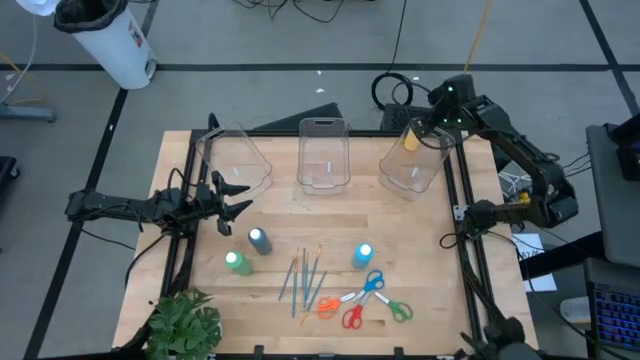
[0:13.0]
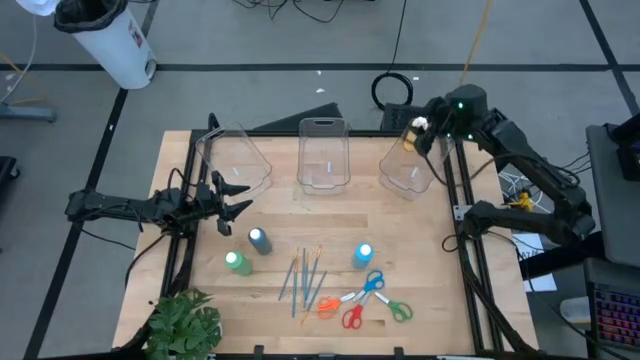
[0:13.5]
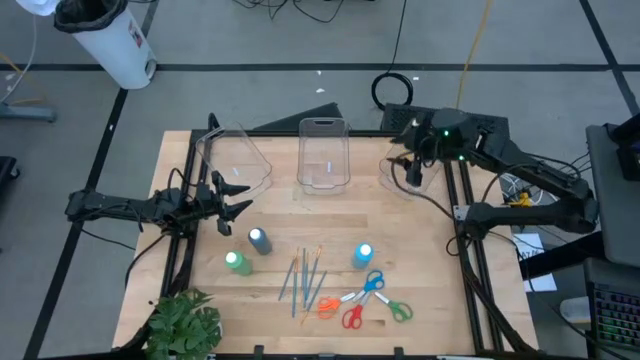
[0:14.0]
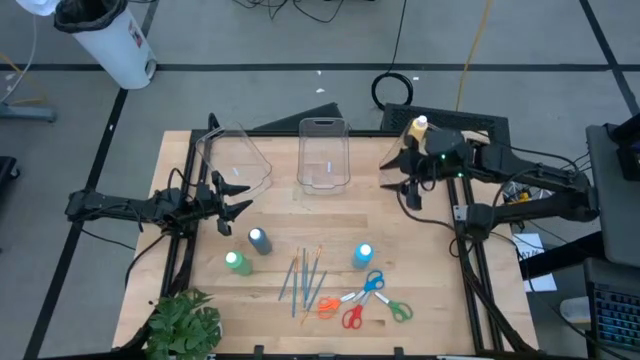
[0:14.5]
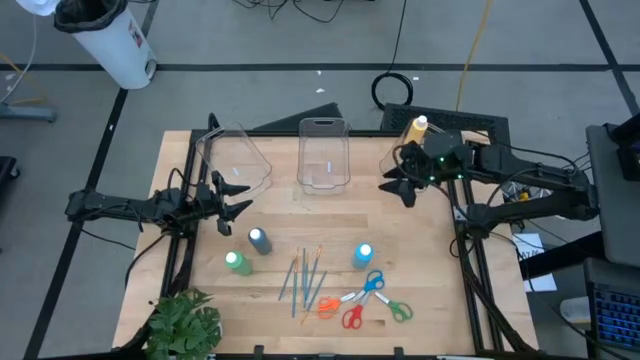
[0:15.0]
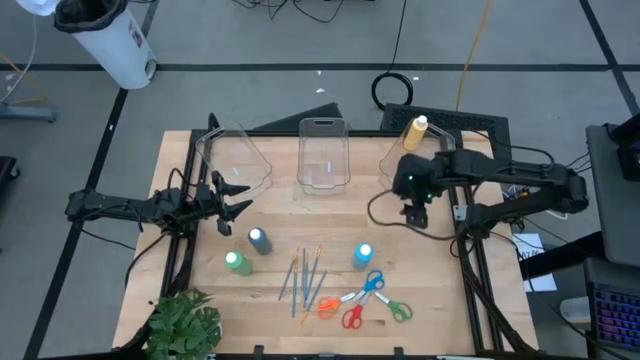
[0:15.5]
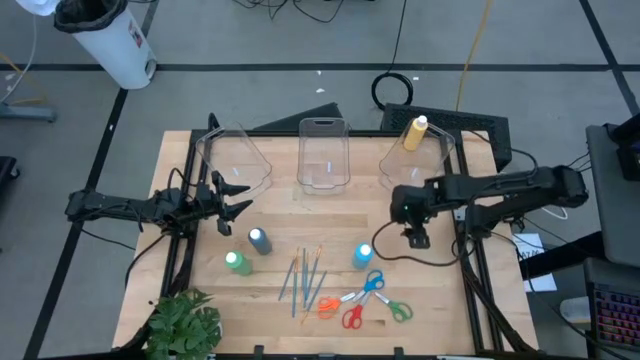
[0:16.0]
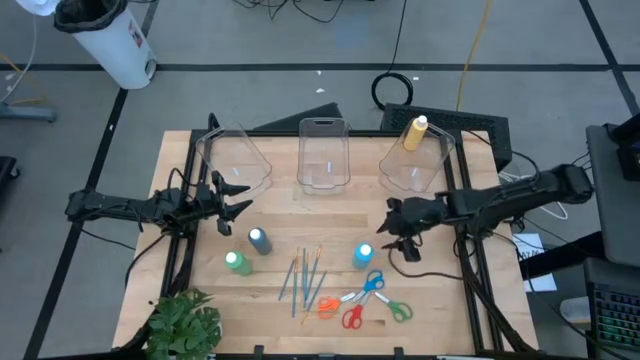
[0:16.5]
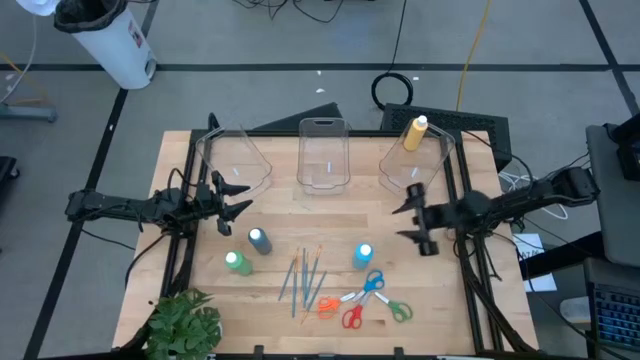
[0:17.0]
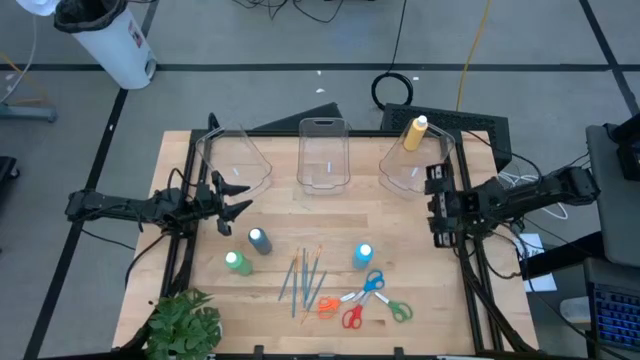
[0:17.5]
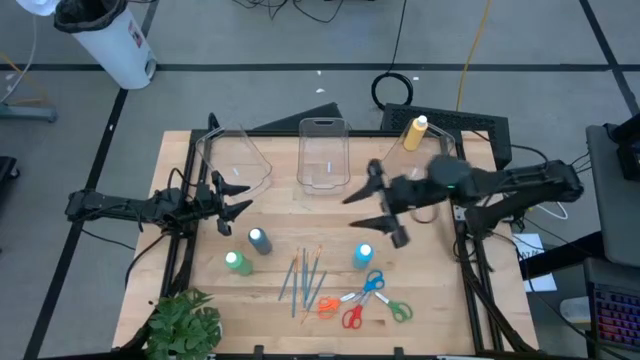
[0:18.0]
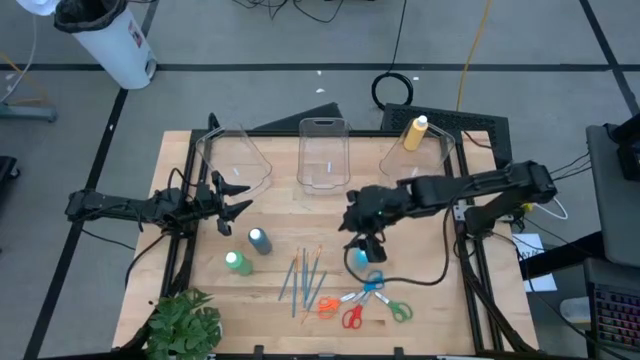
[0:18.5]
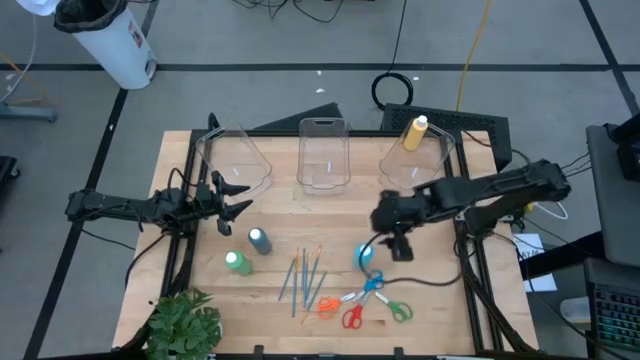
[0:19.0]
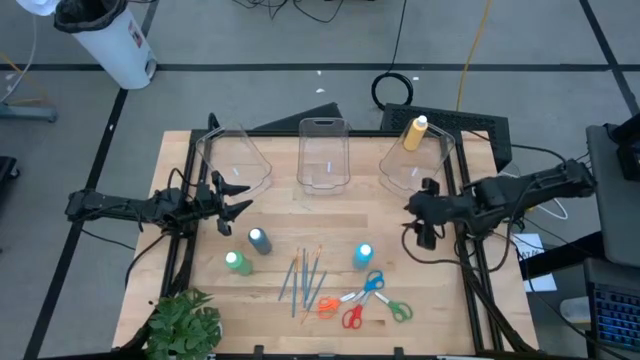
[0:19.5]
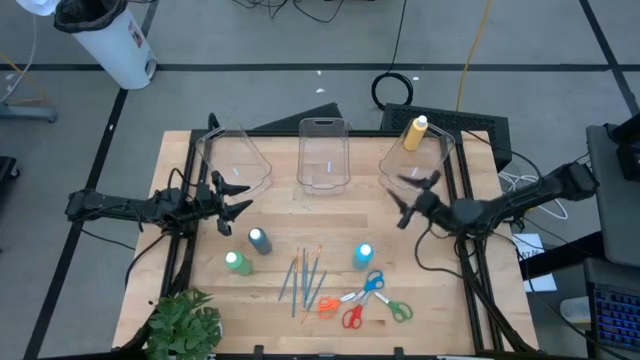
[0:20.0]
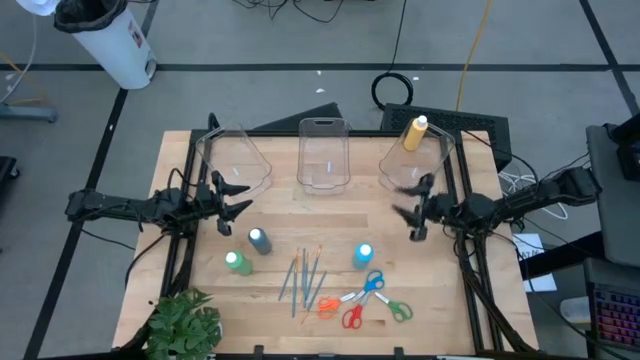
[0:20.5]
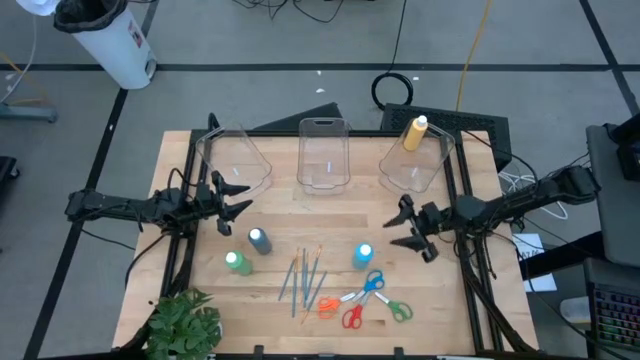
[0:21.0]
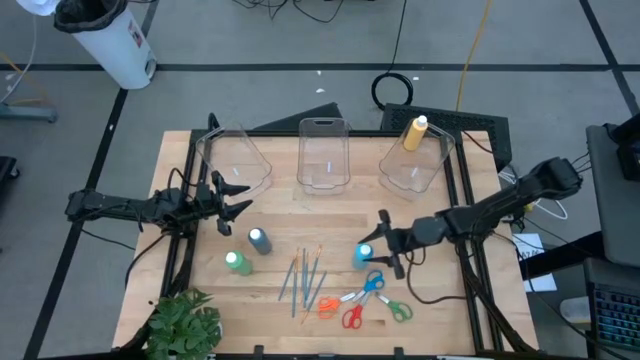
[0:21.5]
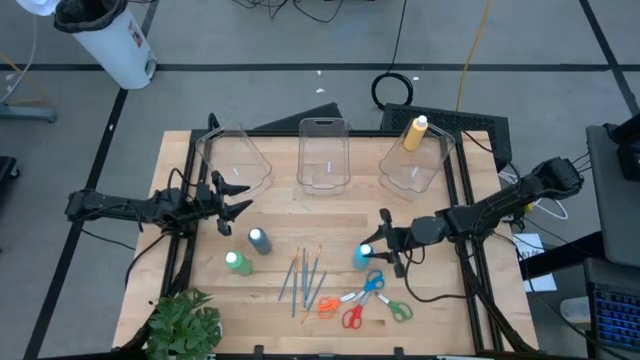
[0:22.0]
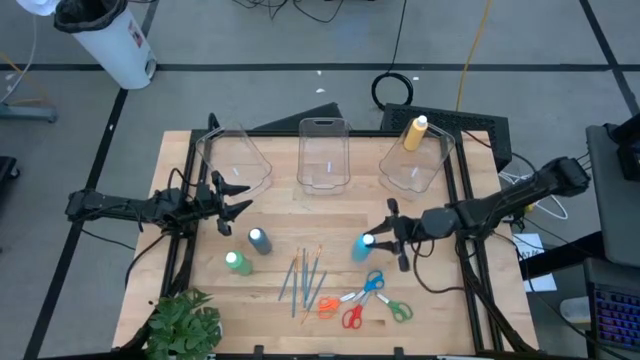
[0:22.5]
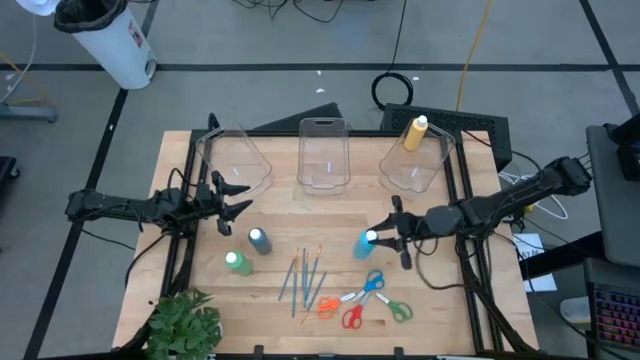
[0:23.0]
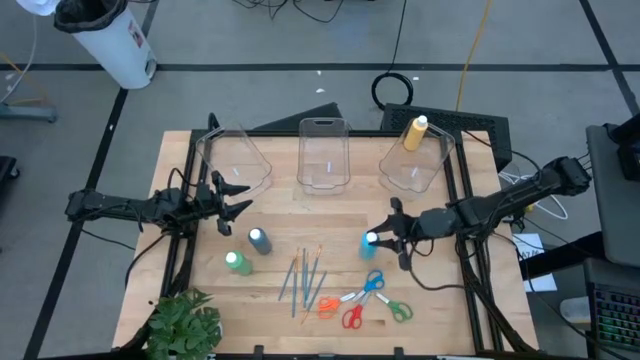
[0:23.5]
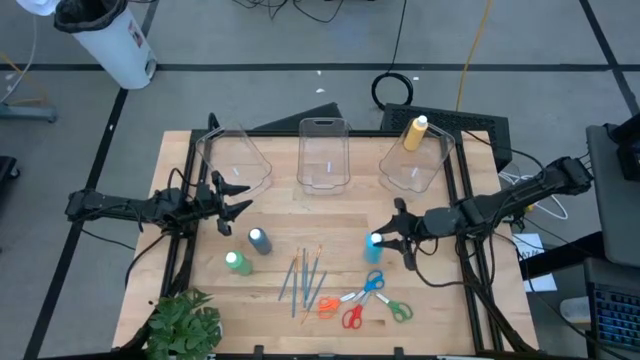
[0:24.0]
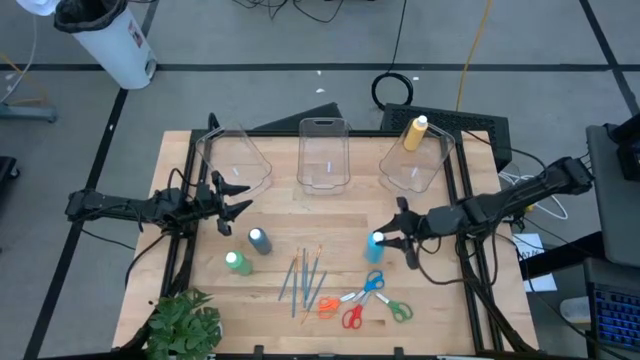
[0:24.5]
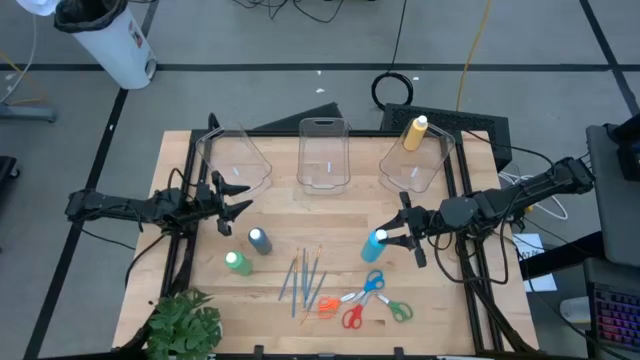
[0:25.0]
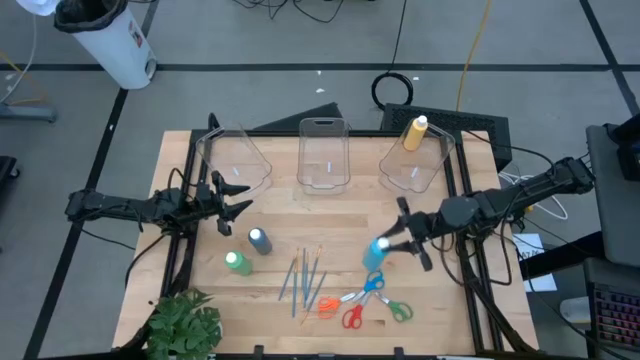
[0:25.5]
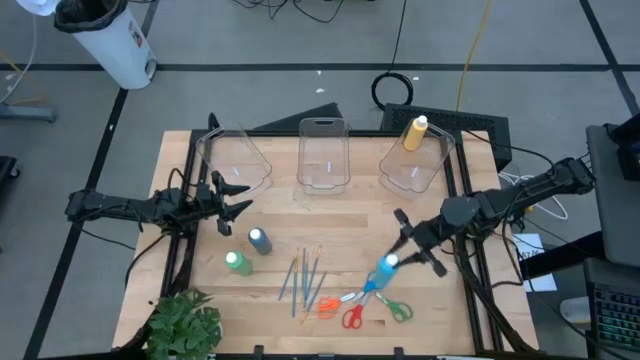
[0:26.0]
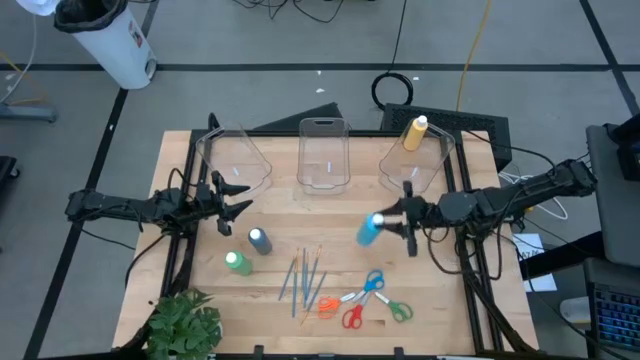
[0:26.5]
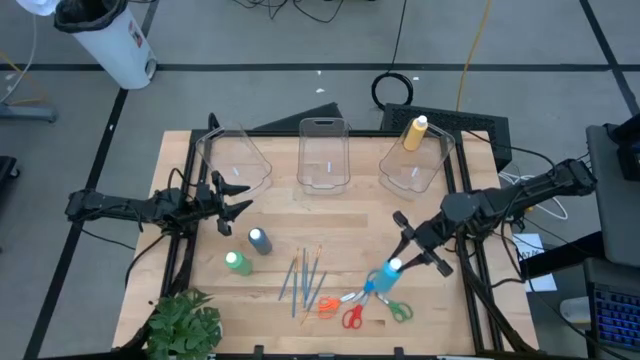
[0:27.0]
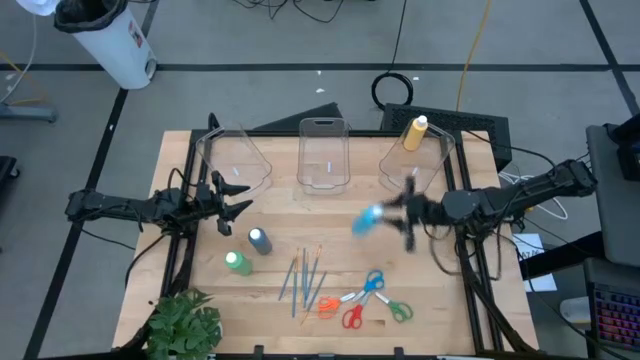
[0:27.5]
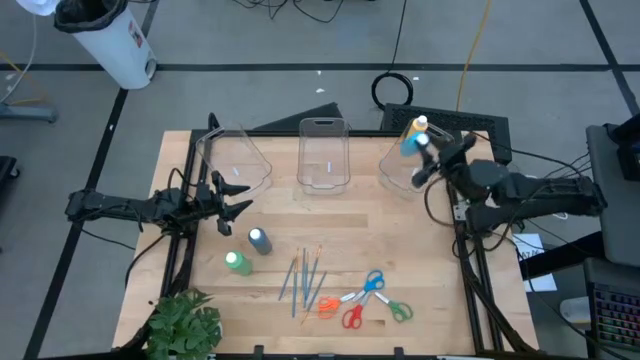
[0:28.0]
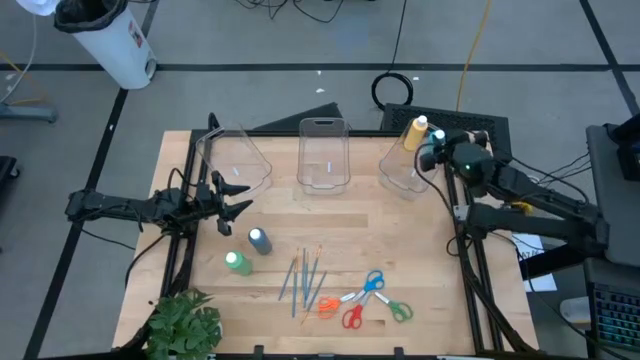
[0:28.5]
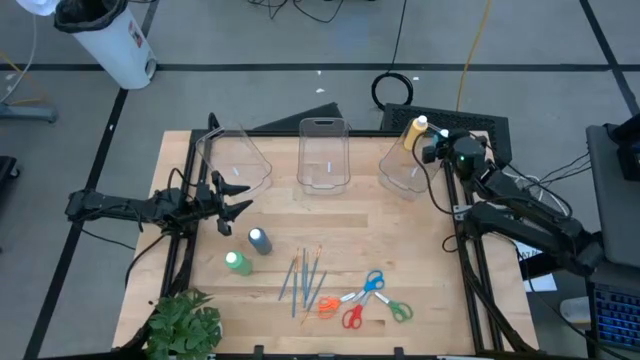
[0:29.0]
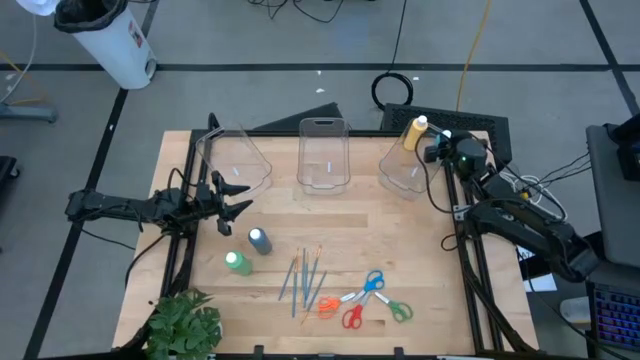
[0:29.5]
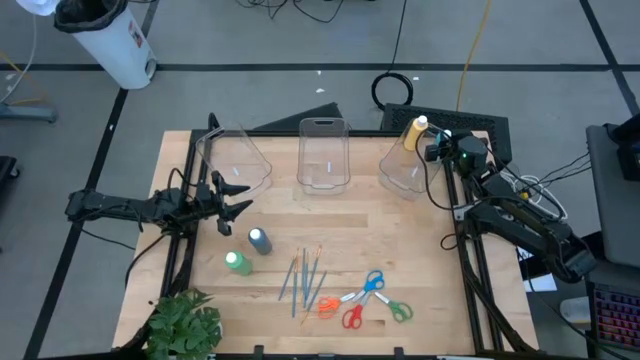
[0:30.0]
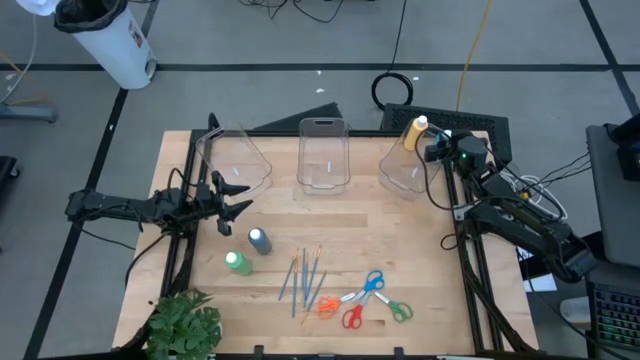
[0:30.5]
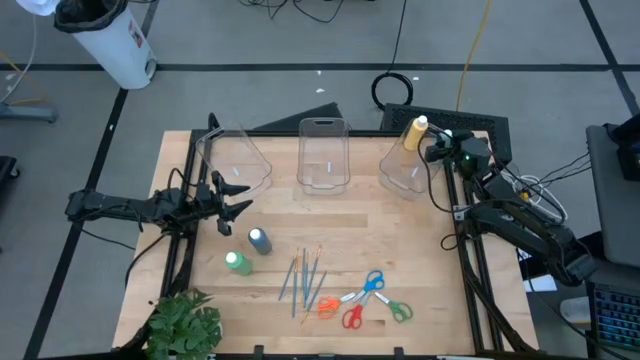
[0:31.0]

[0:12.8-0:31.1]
Task: Pick & Place Paint Supplies
Put the light blue paint bottle into the right transparent bin

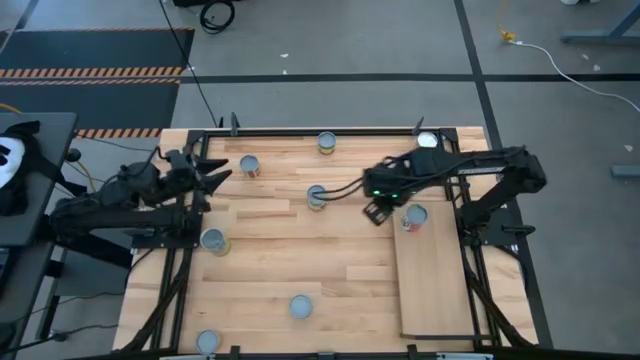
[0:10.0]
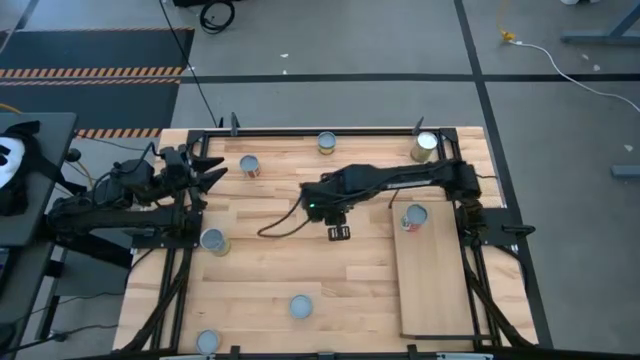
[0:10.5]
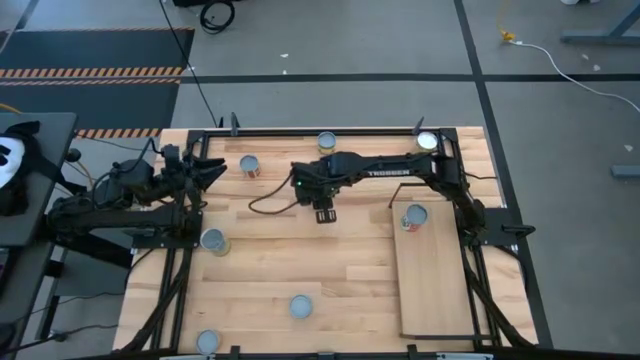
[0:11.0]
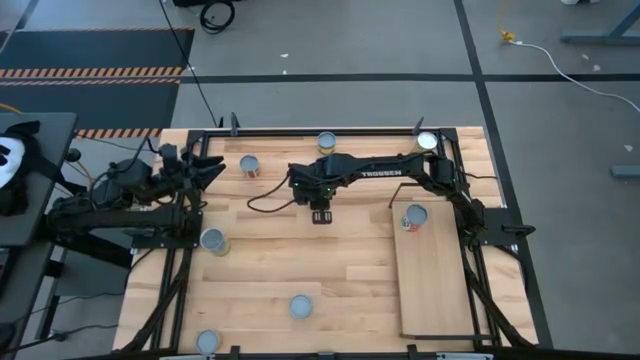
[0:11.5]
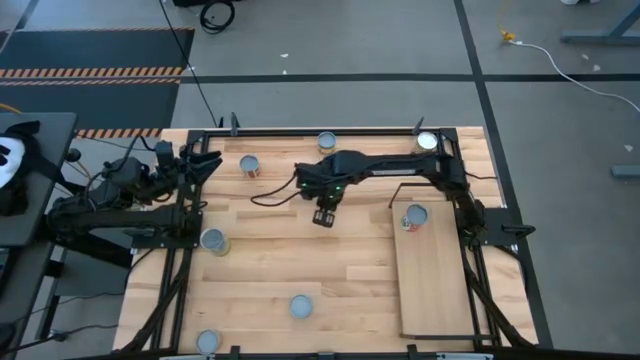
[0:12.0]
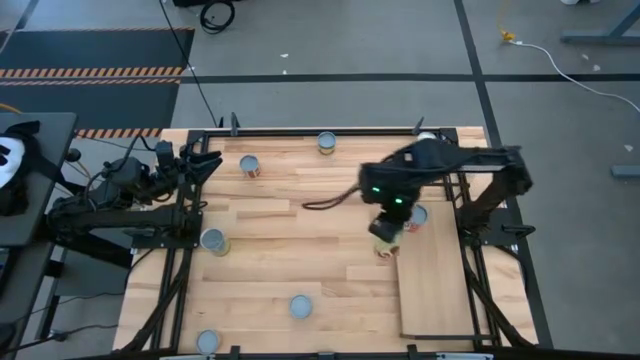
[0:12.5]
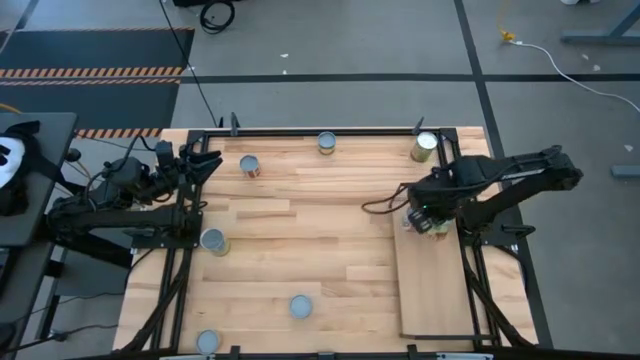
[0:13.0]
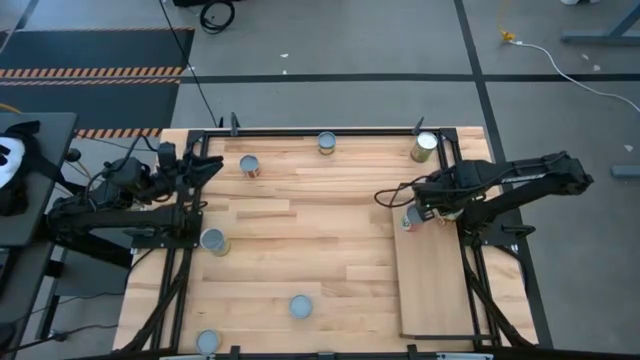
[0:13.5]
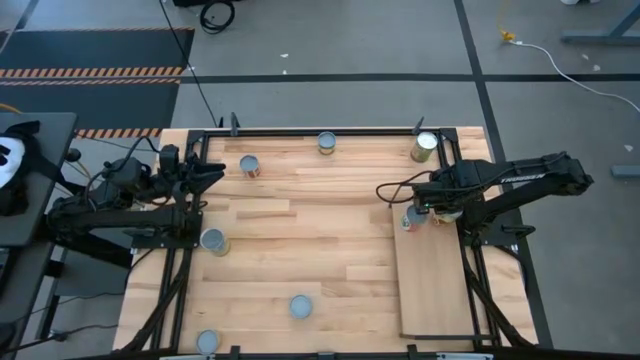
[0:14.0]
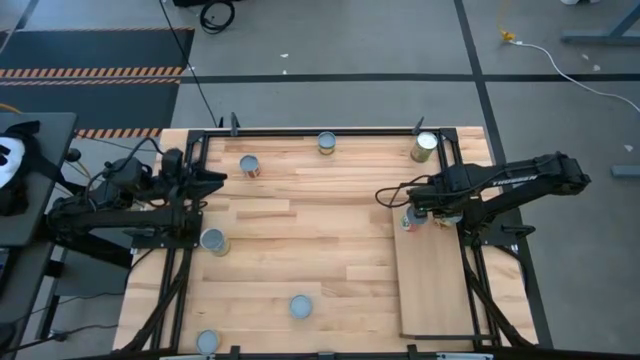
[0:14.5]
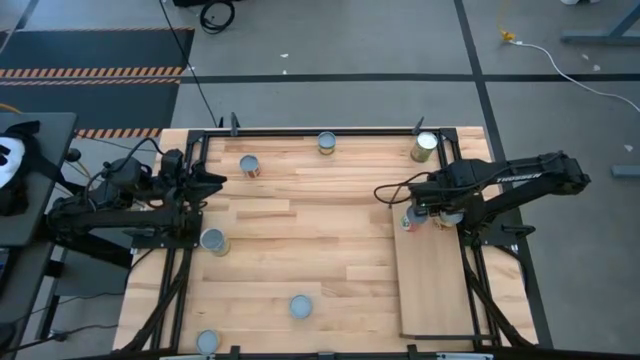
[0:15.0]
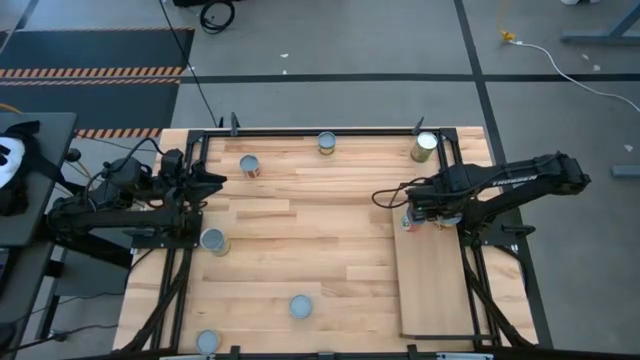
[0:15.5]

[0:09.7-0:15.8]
Task: Pick and place cans onto a shelf
Put the canned spaghetti sauce on the shelf
